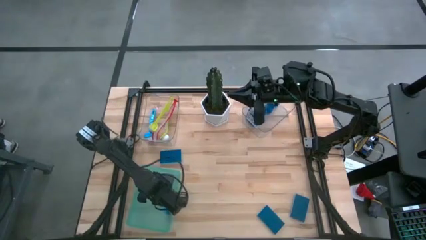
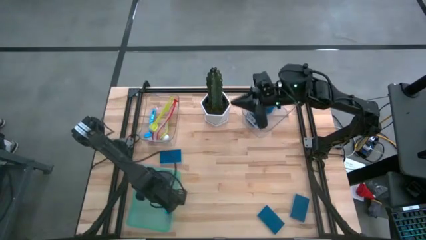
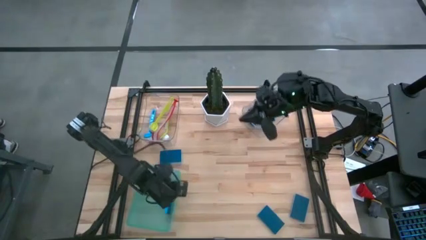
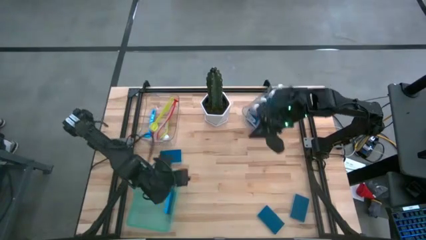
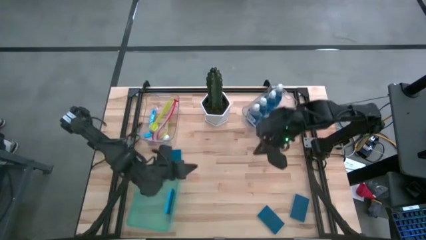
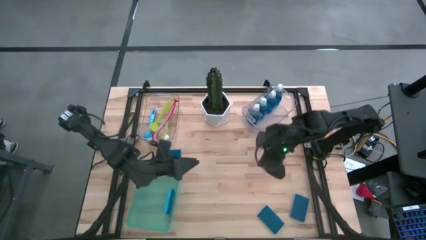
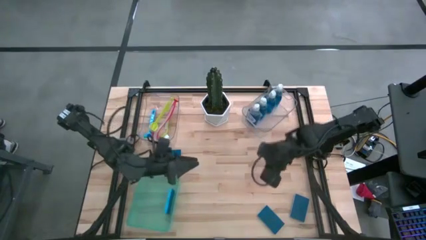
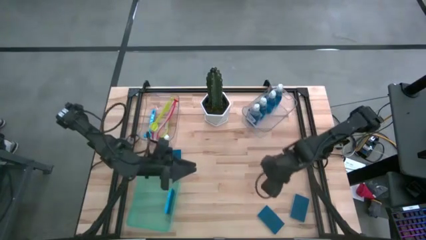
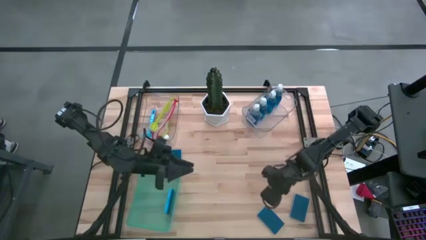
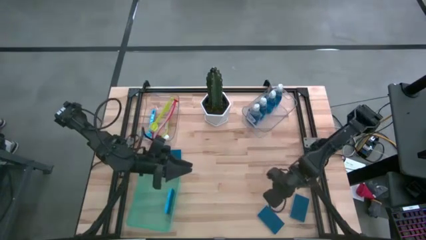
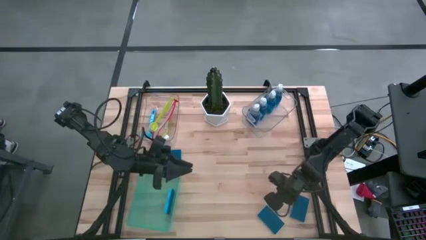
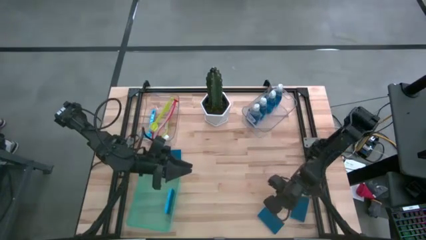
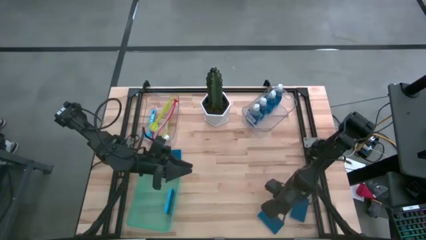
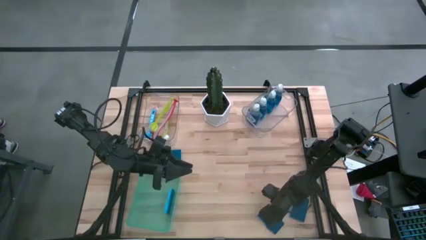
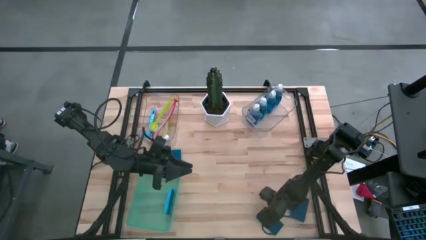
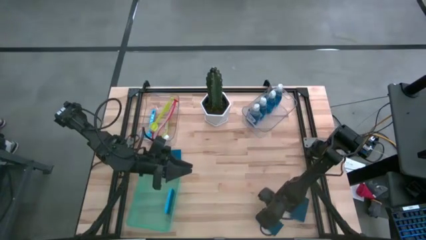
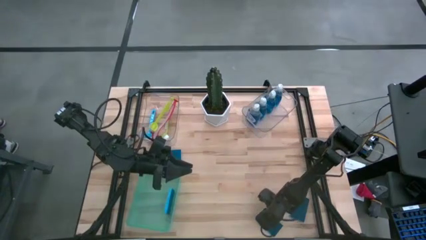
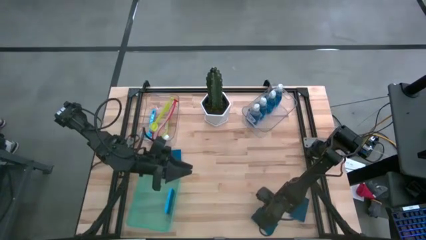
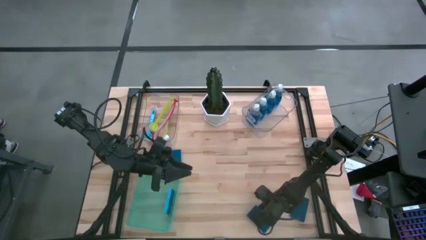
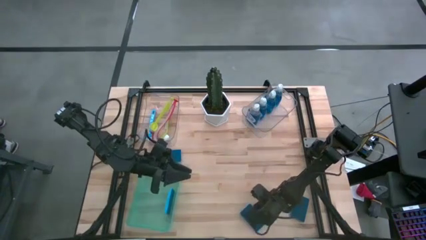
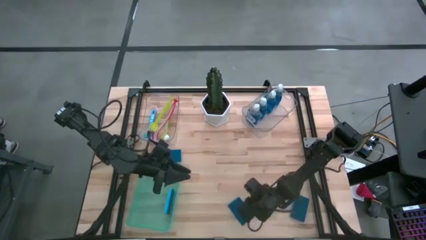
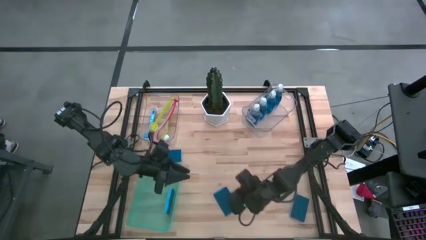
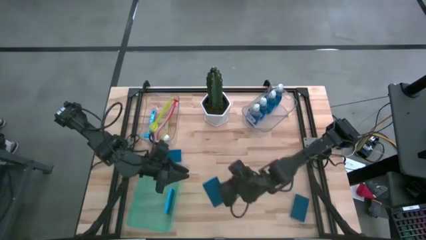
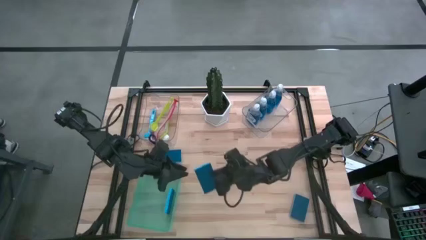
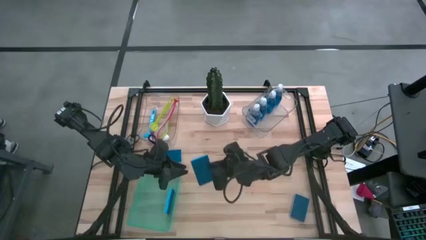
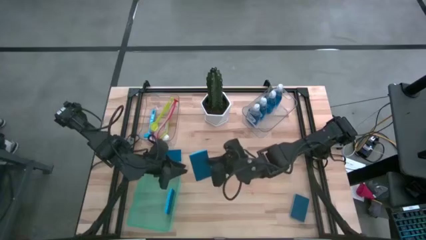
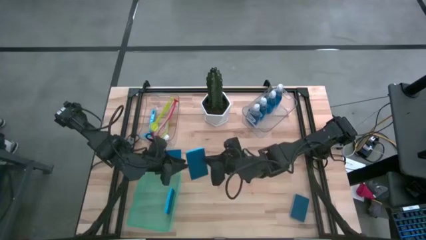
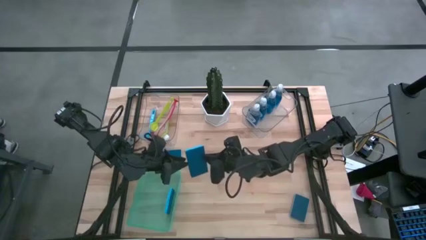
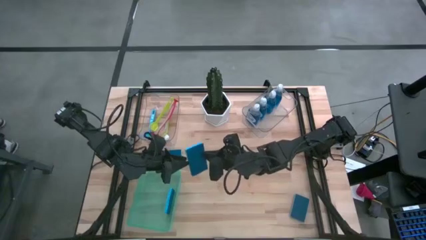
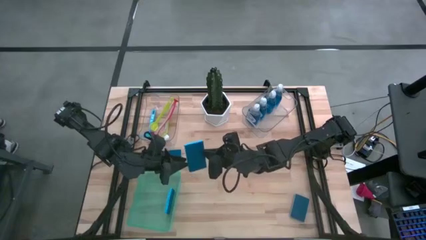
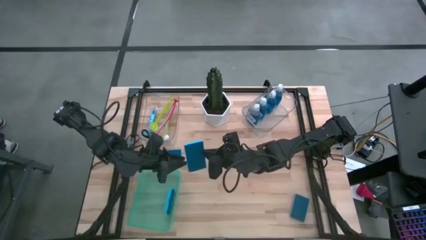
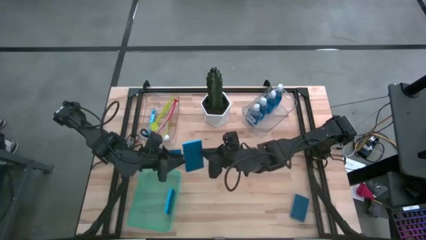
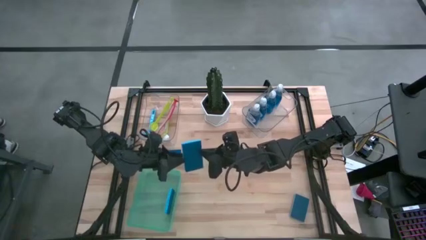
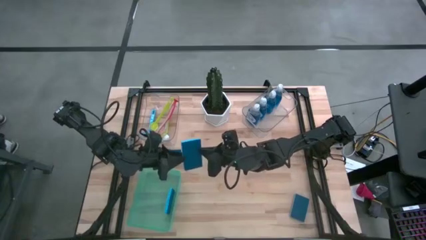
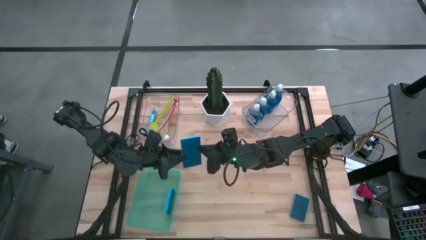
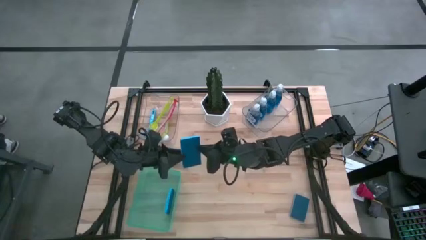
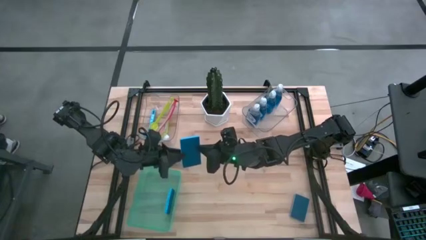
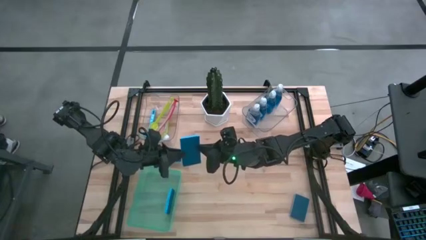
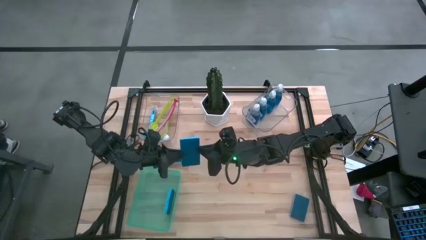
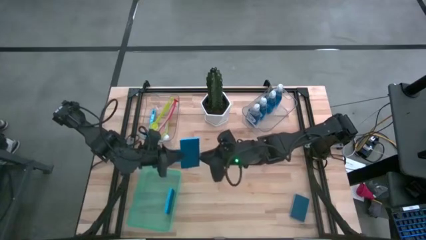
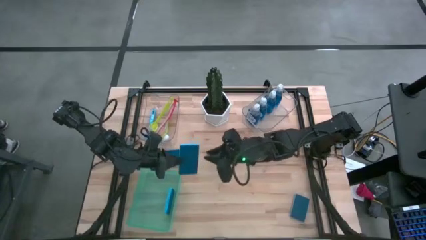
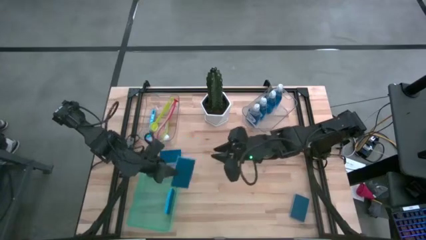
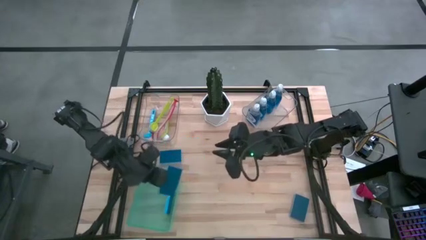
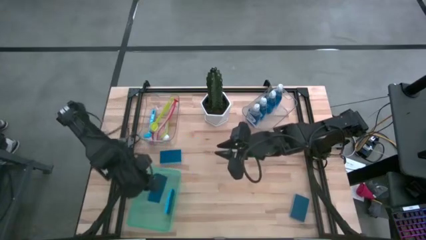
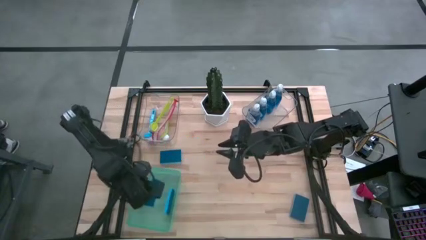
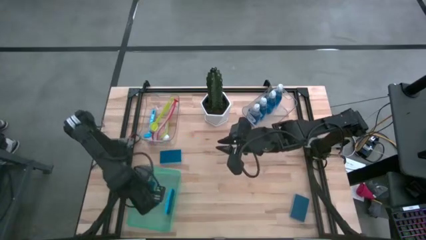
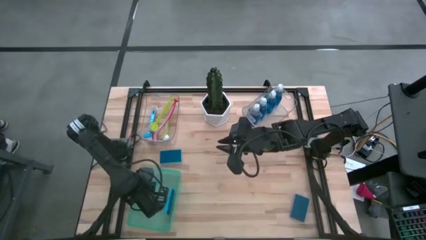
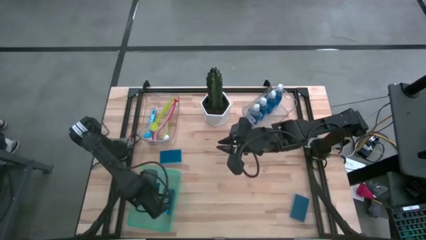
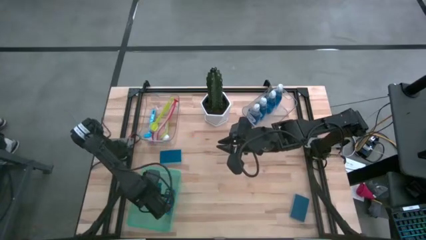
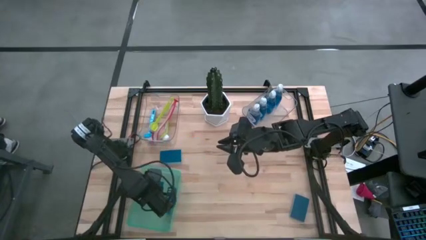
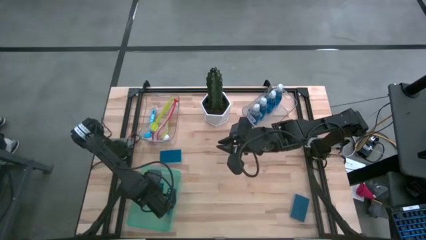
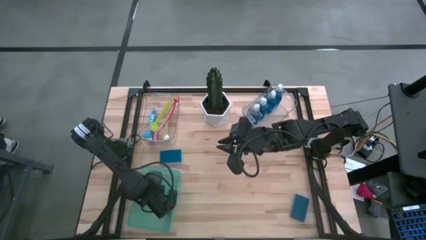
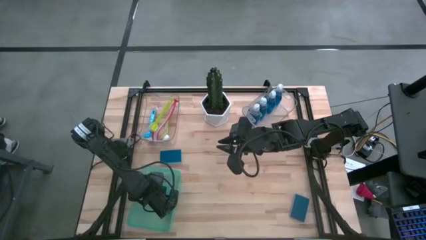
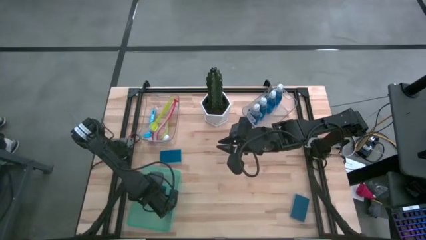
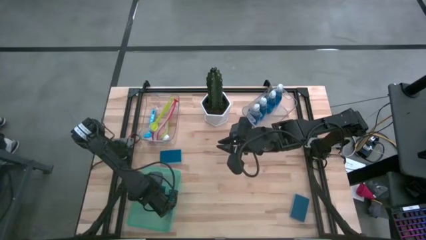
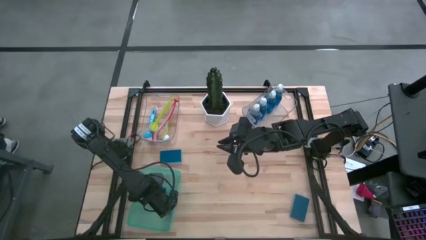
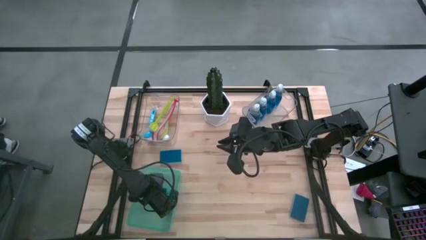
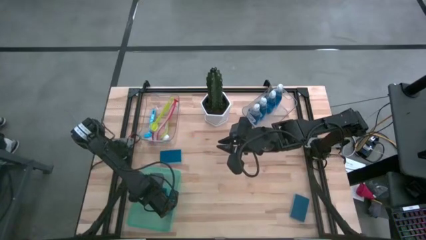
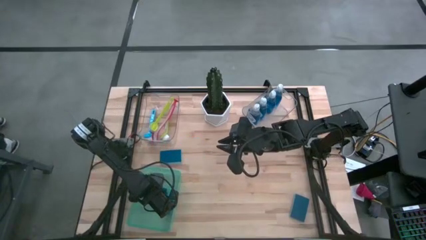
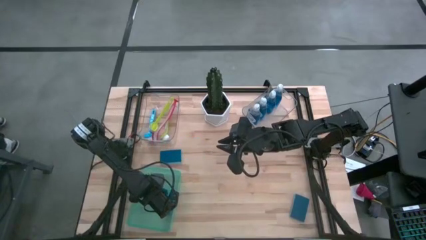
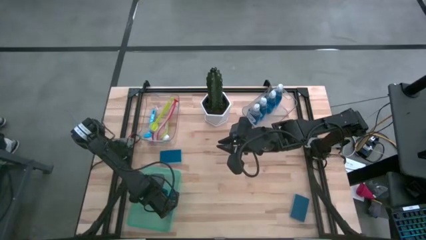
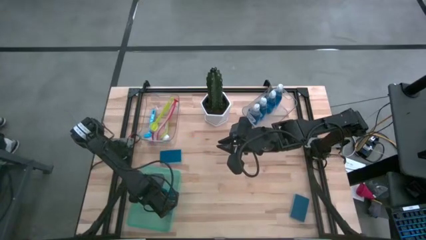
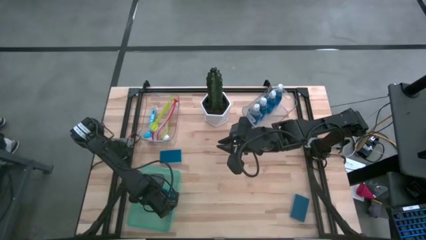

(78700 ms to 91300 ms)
Task: Pick & Place Kitchen Sink Supplies
Put the sponge into the green bin
